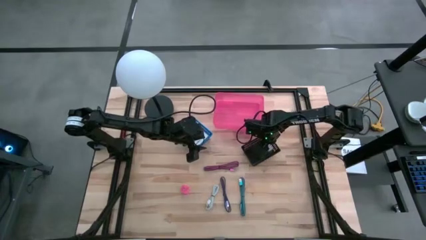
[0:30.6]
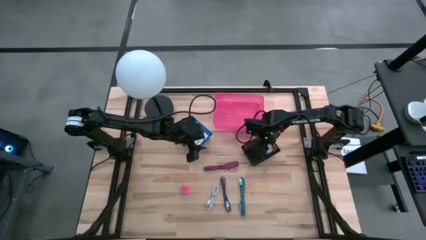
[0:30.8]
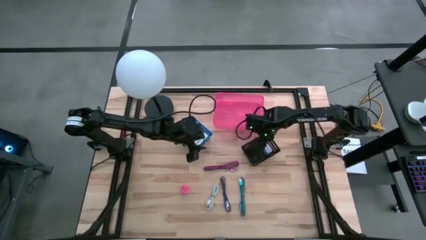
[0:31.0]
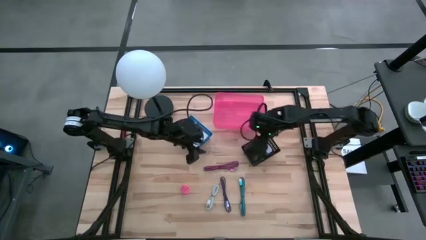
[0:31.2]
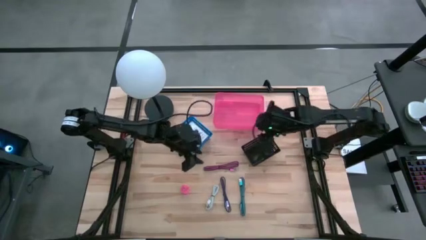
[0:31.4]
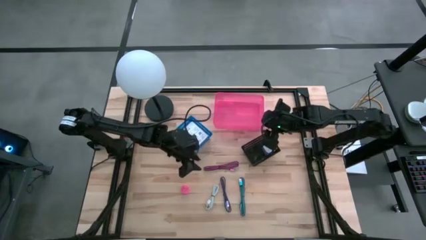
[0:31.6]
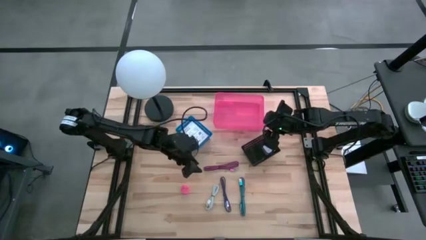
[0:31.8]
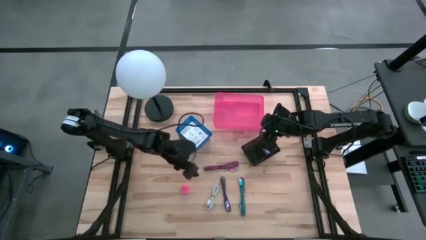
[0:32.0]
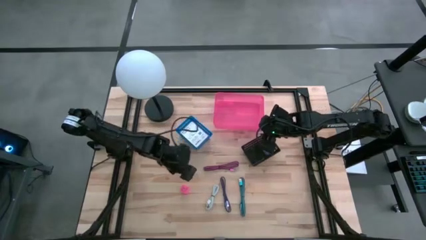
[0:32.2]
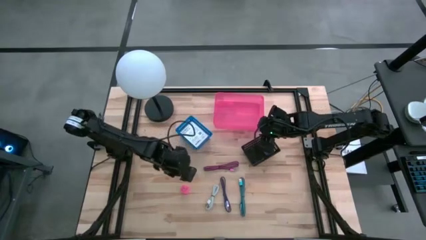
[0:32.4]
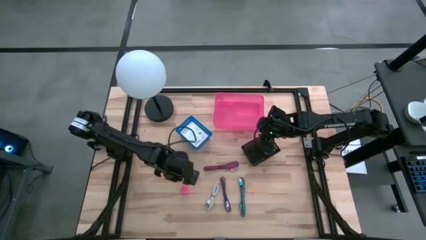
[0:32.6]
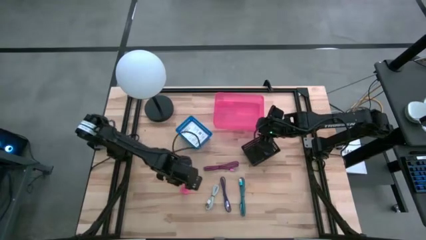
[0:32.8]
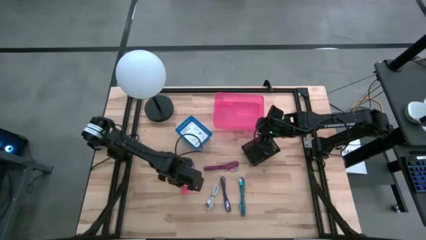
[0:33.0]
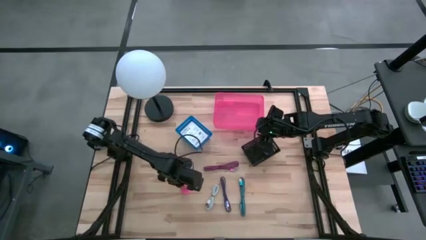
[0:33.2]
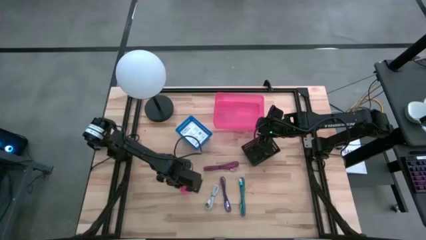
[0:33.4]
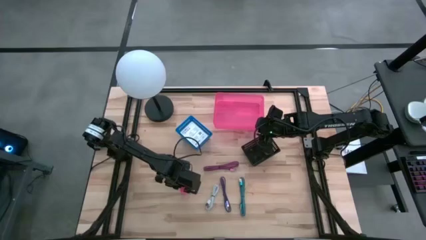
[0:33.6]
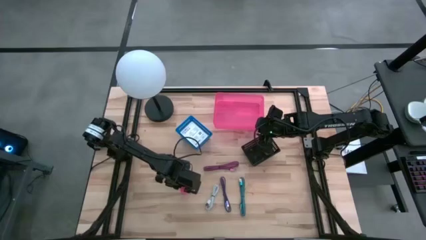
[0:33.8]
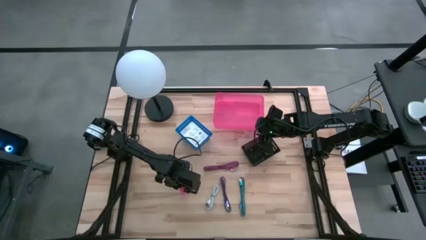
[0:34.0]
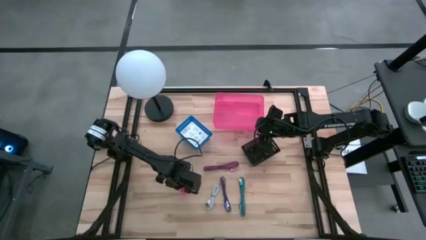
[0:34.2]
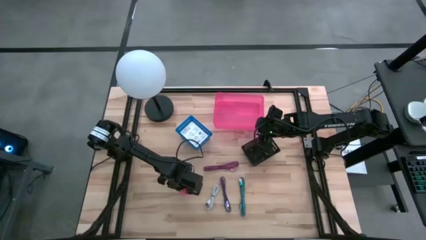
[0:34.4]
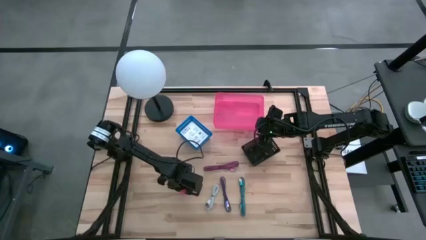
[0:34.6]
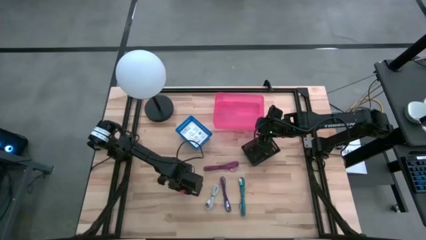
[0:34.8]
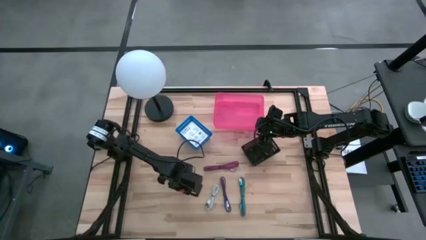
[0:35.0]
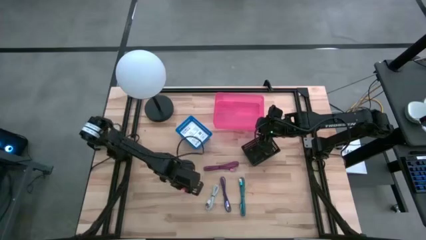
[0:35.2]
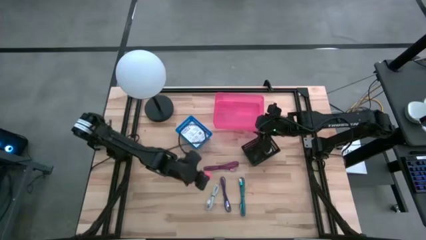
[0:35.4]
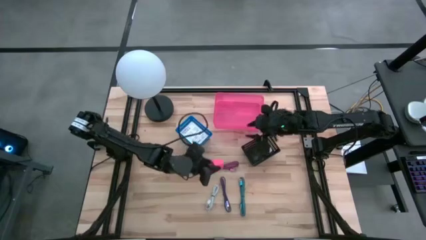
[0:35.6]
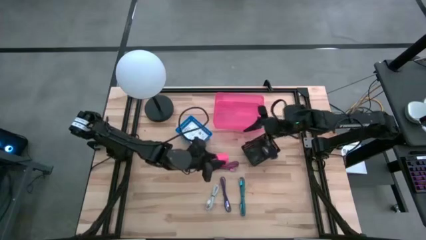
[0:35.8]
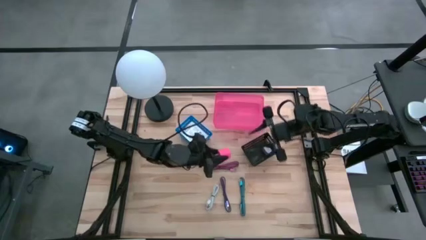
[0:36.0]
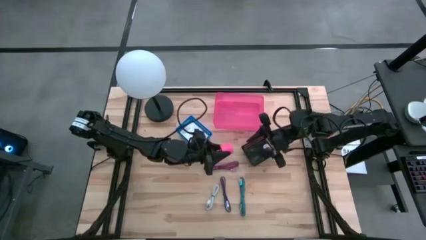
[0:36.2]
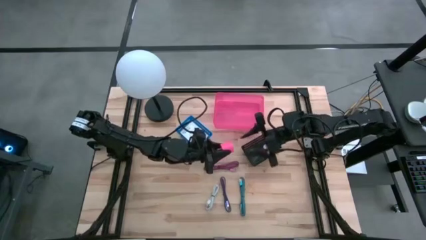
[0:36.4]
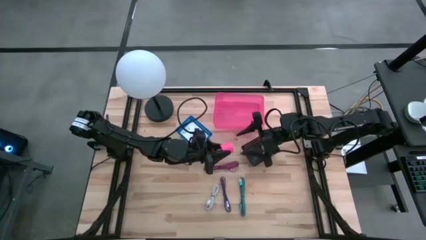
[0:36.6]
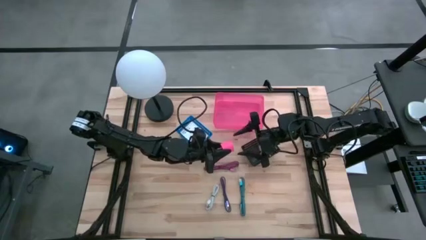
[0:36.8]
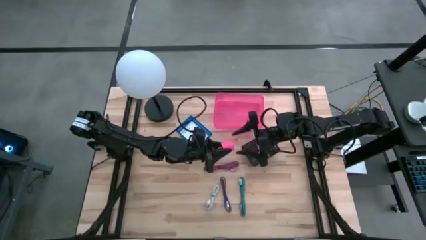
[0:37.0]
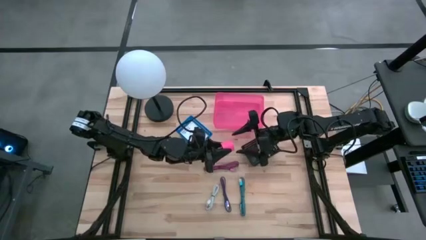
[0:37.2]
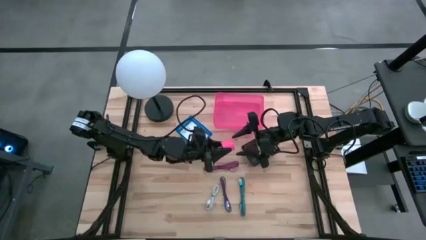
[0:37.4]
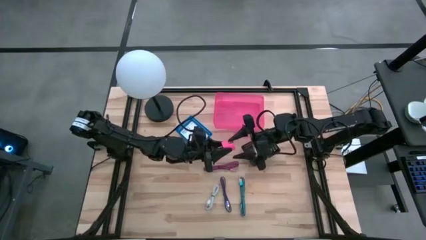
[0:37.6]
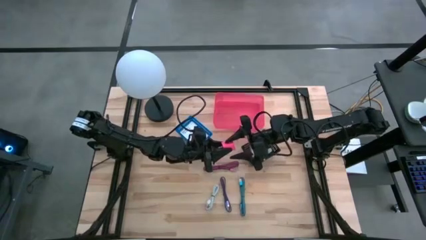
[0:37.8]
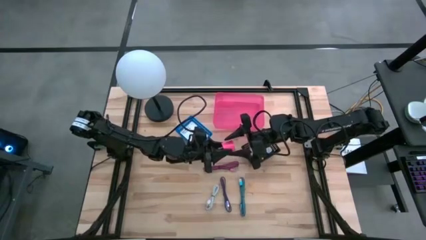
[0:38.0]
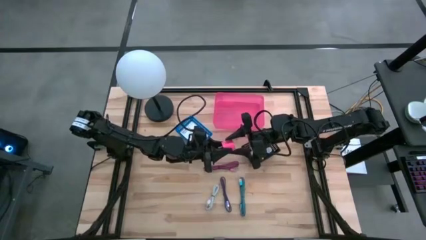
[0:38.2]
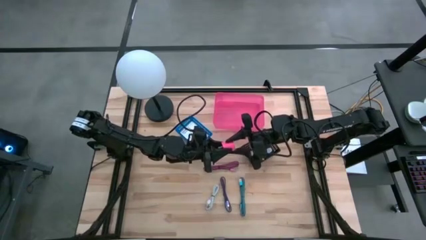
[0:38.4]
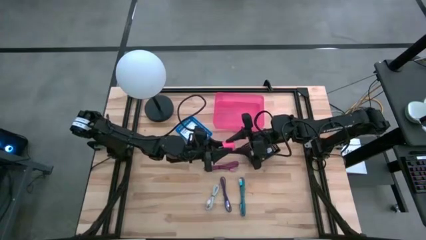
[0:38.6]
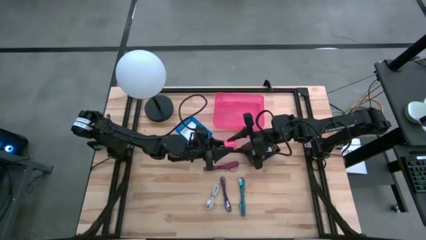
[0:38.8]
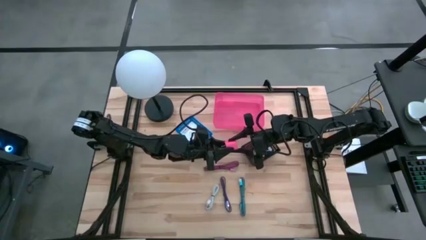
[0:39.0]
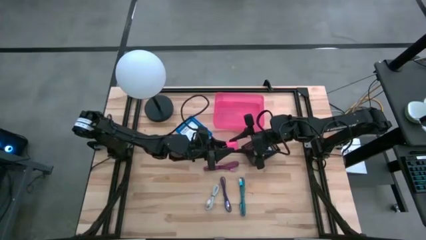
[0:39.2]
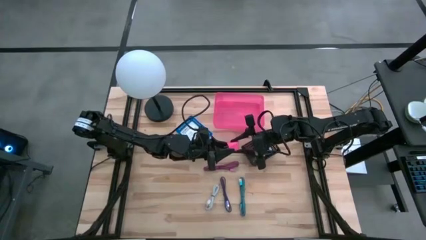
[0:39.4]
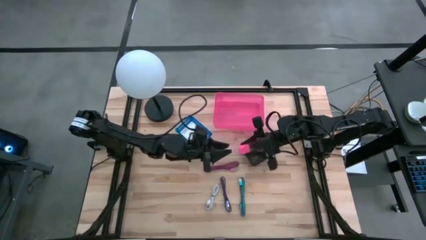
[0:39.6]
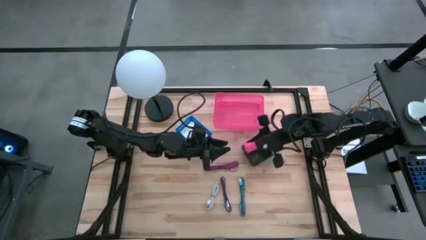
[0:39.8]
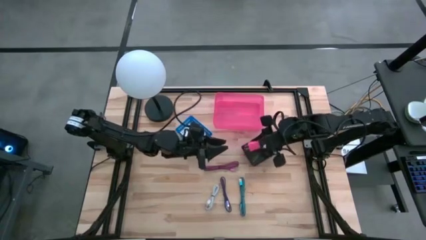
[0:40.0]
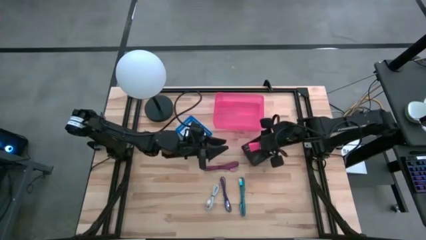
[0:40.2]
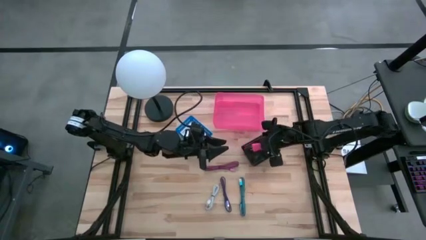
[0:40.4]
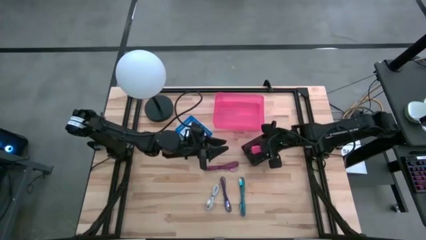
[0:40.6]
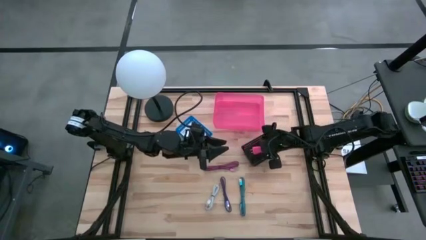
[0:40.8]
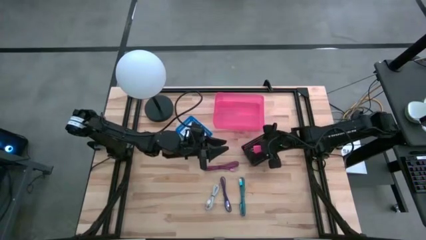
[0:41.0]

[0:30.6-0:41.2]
Task: Pick and place items into bin
Put the pink charger adapter into the black bin

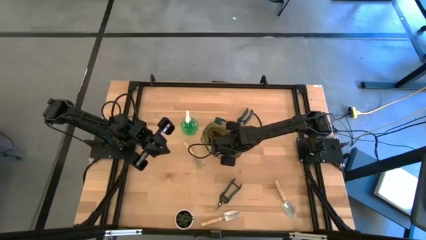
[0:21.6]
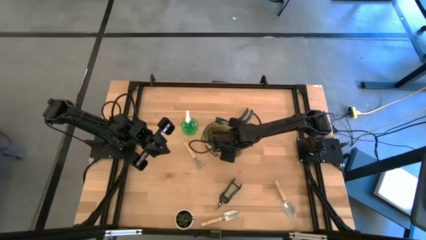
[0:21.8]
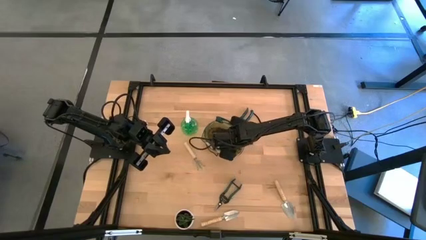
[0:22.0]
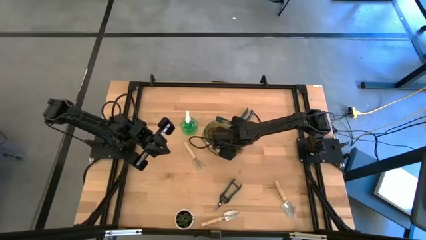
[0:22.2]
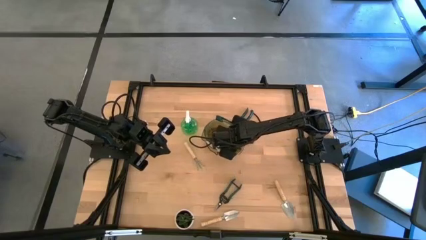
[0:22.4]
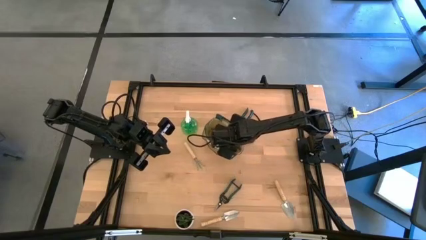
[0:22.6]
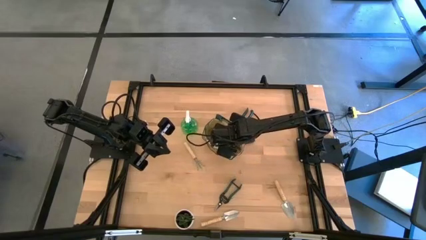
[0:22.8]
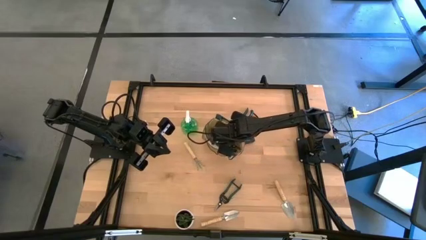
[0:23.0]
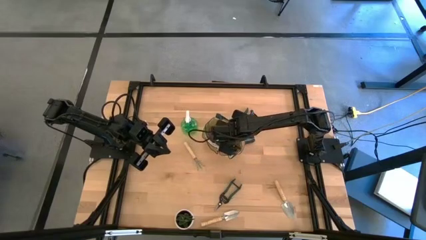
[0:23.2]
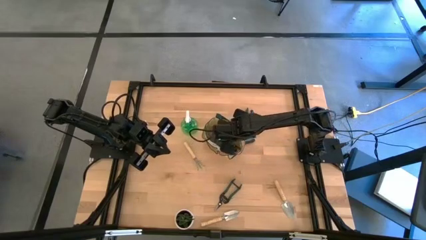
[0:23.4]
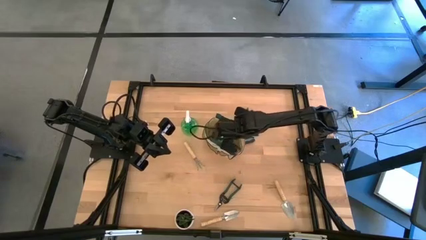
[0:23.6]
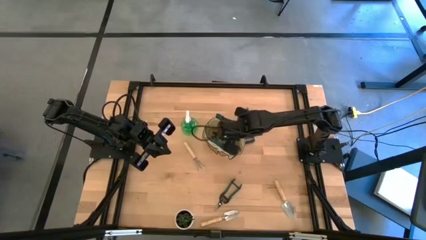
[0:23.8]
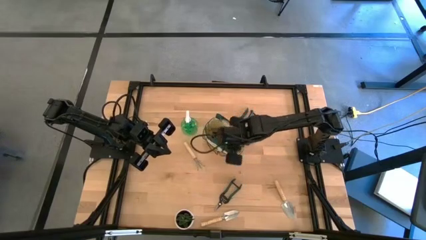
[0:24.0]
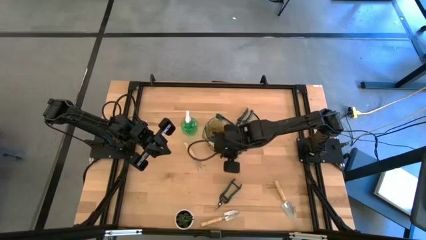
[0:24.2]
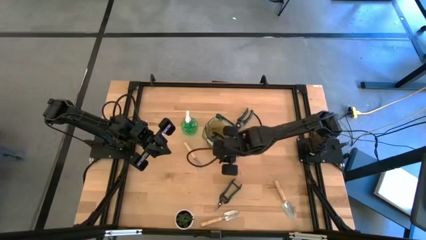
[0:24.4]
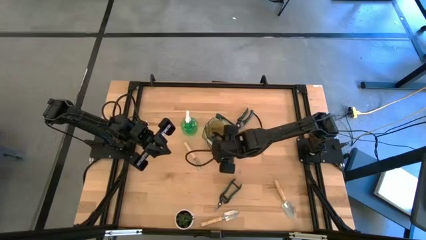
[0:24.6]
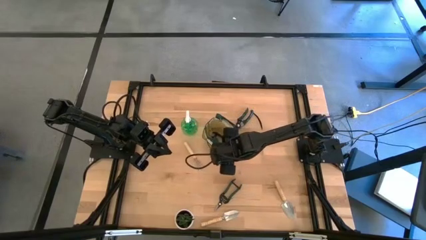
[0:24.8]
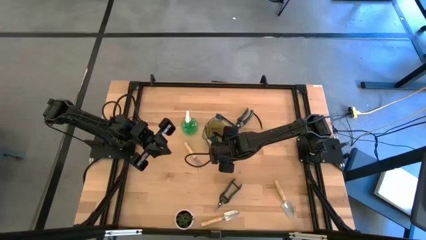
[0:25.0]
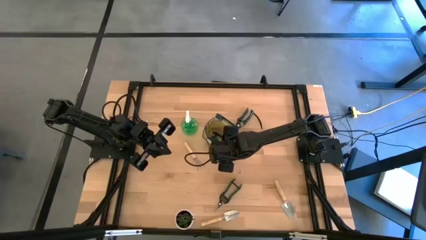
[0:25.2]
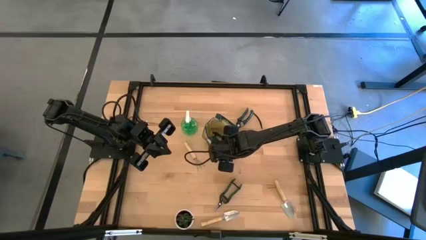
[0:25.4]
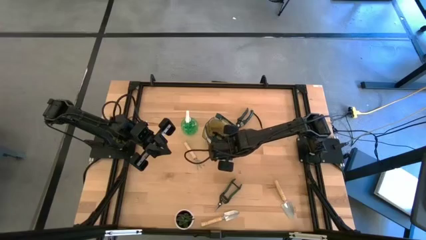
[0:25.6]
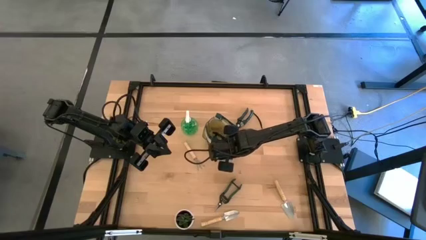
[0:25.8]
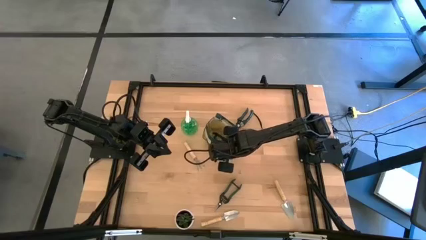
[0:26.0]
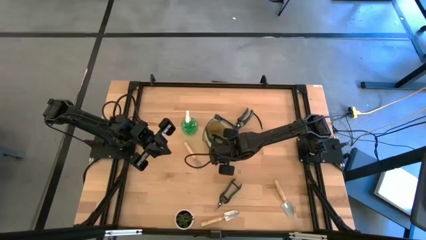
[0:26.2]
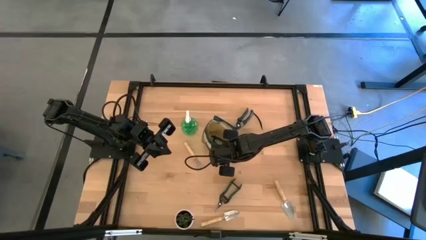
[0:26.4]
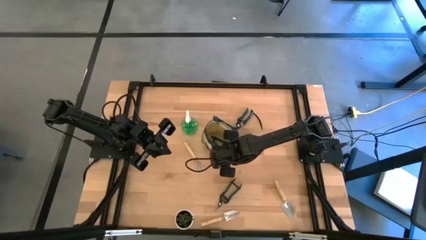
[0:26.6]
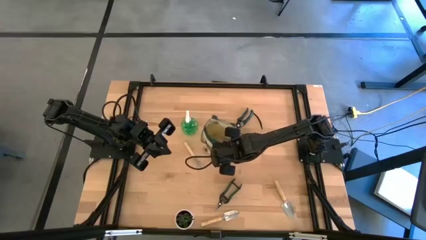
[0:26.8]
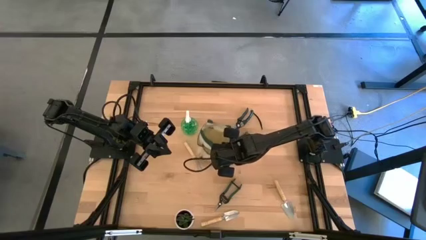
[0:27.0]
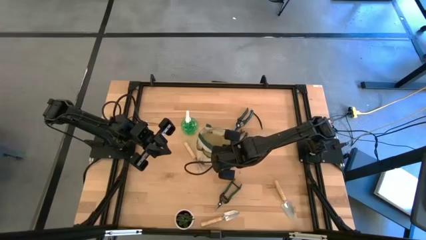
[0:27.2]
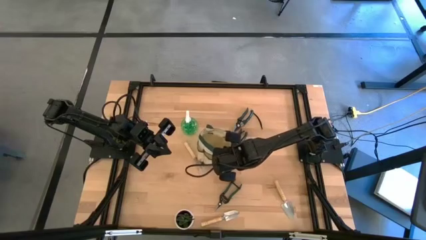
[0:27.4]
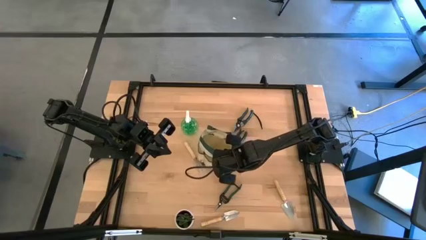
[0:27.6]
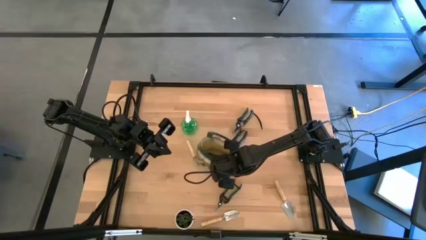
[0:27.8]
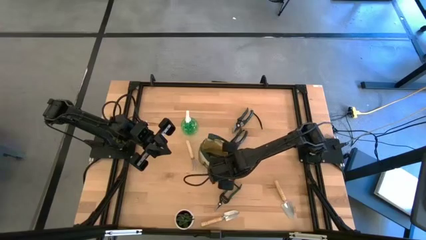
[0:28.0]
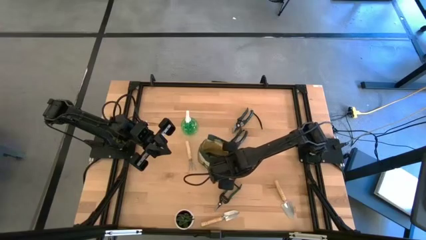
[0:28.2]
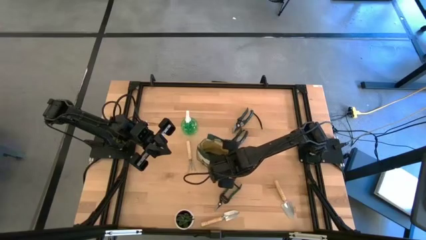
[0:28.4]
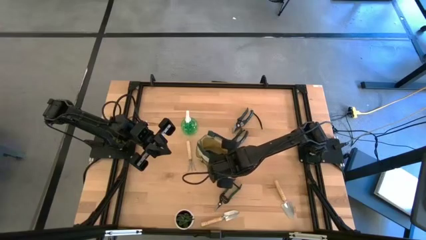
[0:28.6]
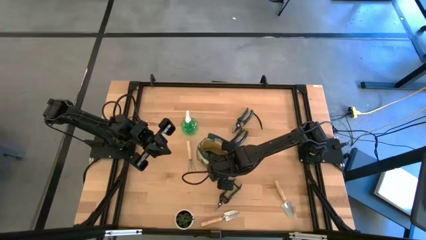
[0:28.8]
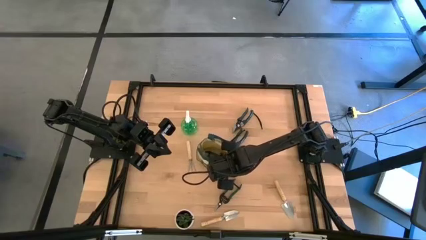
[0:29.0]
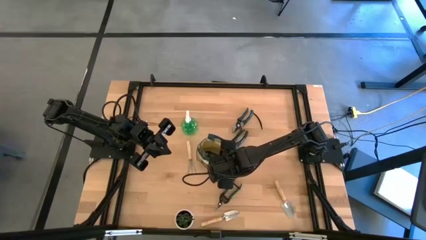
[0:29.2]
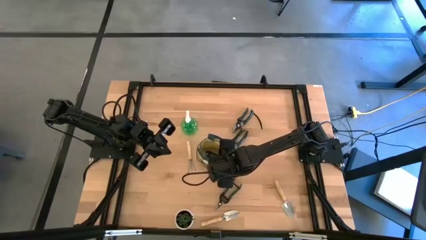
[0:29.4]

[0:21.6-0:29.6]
Task: Pick & Place Garden tools in Gardening bag
Adjust the green gardening bag
